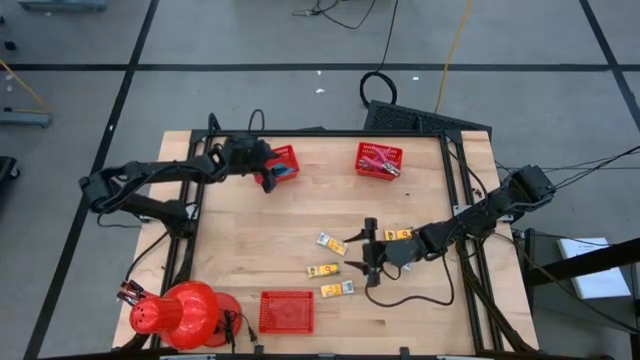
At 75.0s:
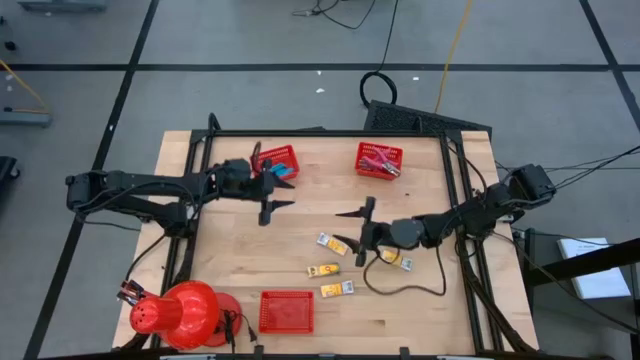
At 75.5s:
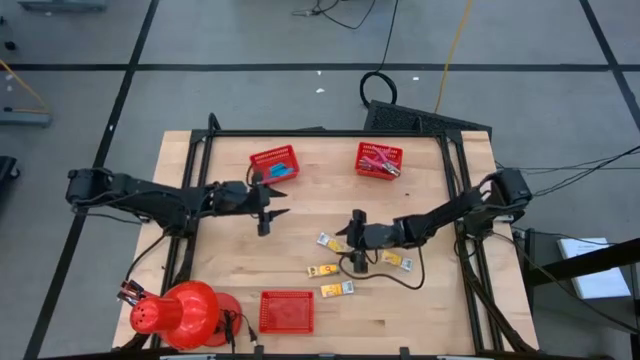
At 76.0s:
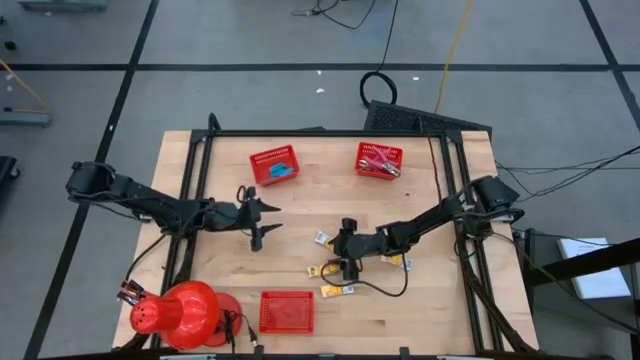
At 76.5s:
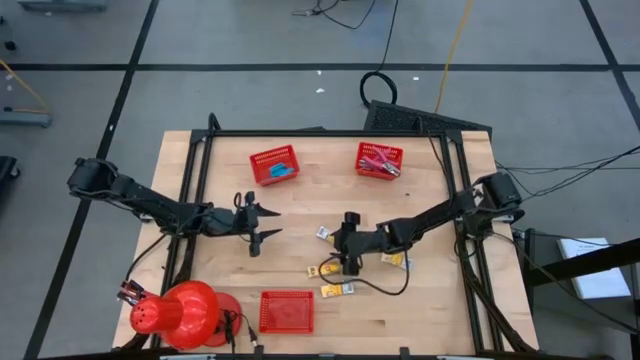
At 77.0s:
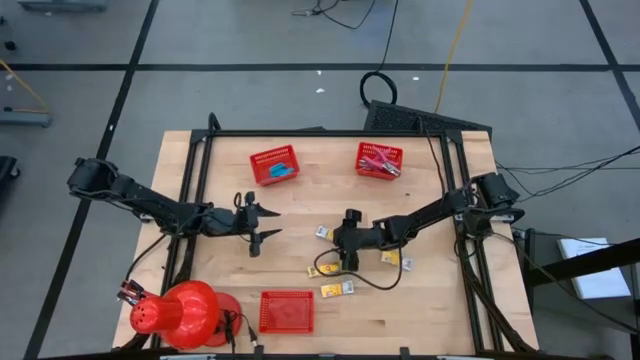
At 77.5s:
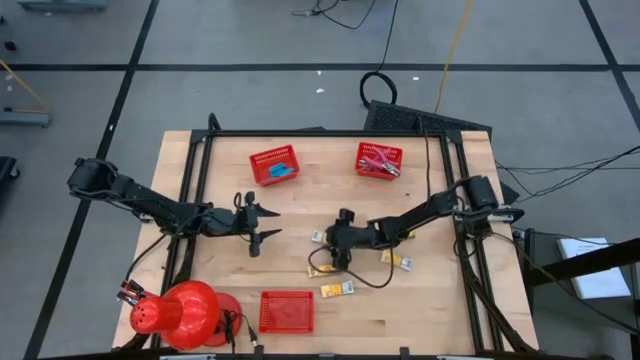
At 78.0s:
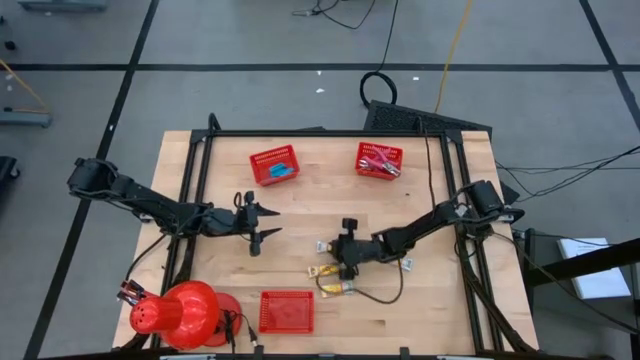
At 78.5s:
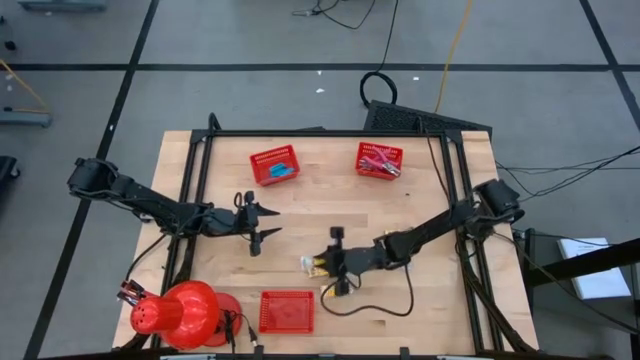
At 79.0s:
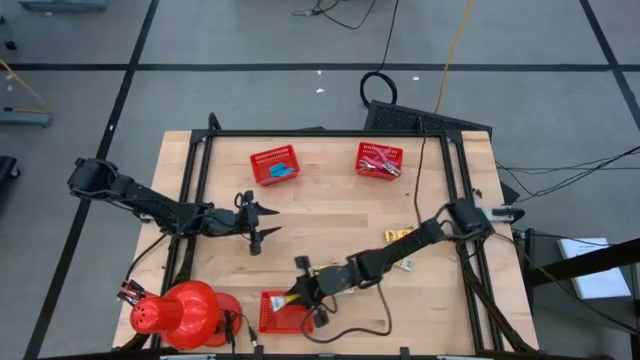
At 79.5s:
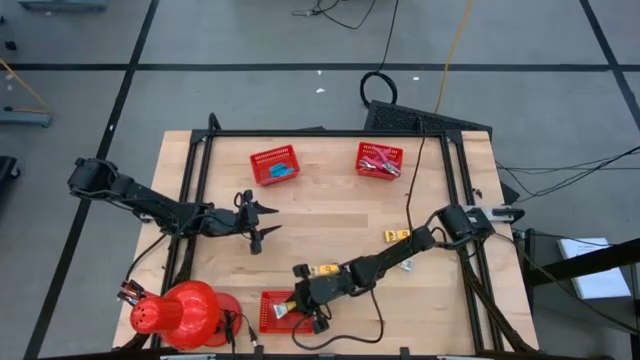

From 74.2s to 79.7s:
Task: Pick & Place School Supplies
Put the yellow crayon pack into the bottom left red bin

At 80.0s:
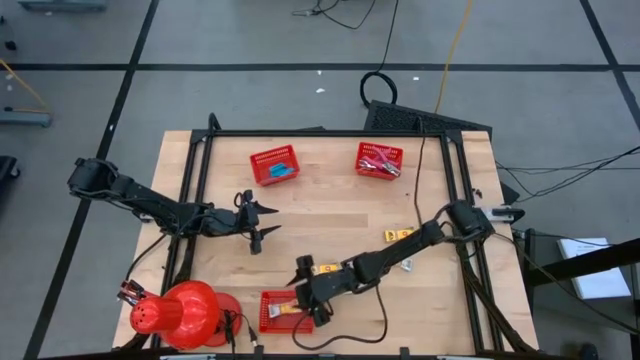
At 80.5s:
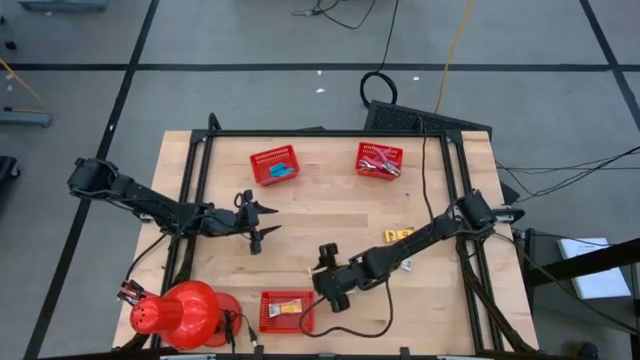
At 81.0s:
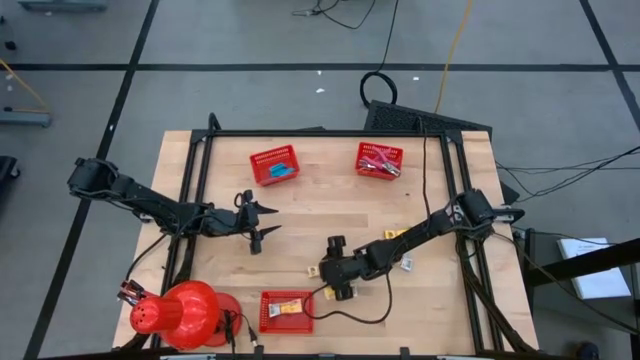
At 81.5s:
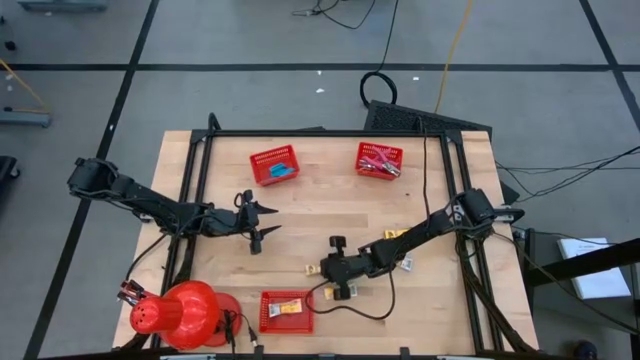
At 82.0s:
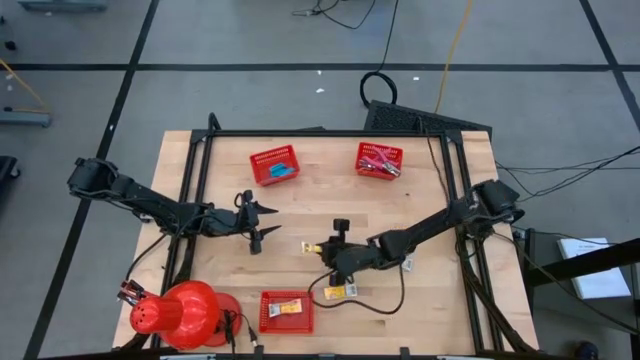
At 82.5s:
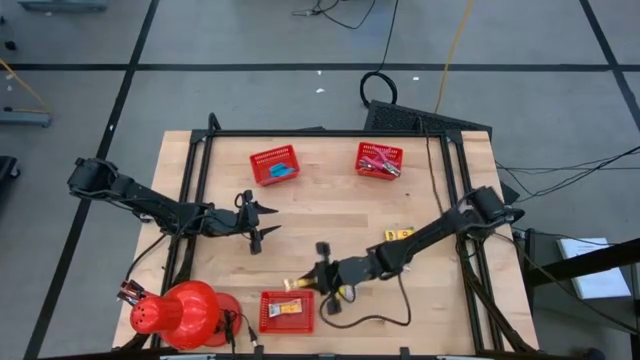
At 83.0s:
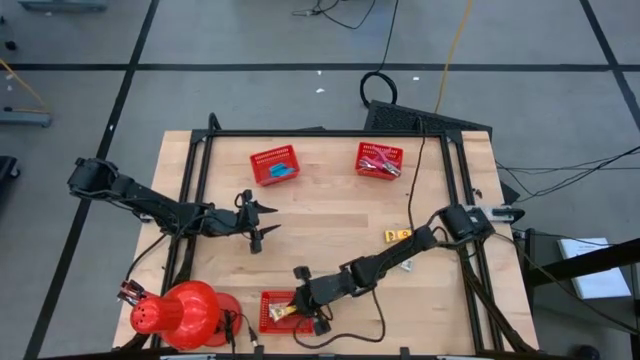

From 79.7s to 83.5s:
Put the yellow crayon pack into the bottom left red bin

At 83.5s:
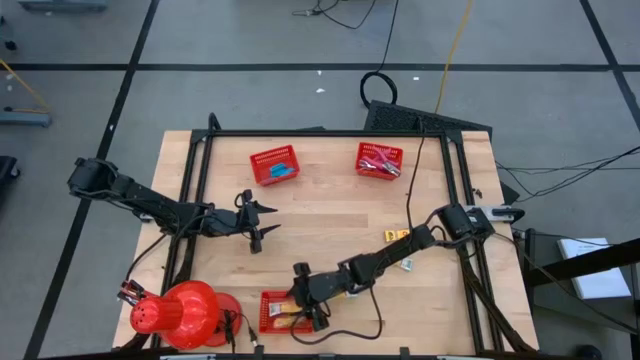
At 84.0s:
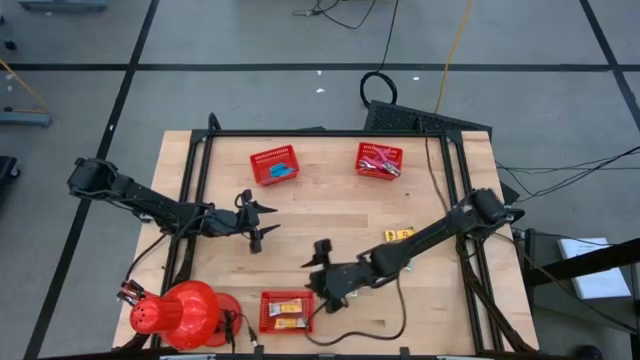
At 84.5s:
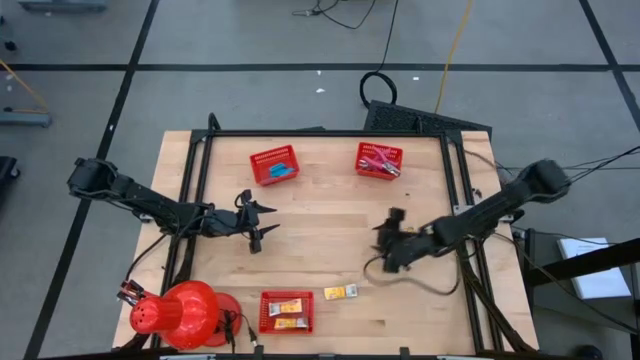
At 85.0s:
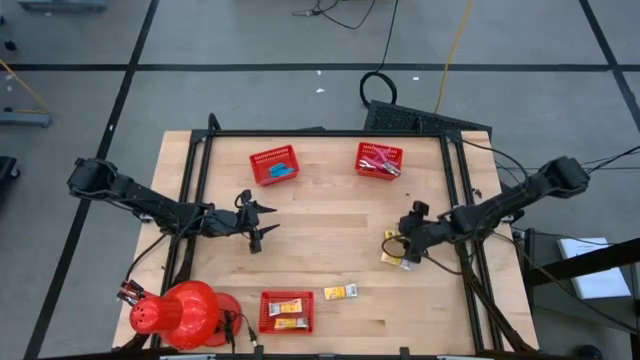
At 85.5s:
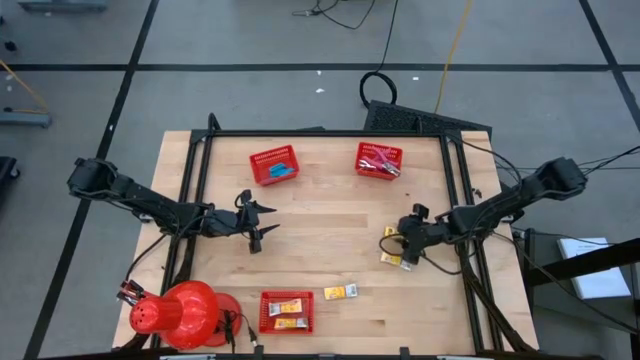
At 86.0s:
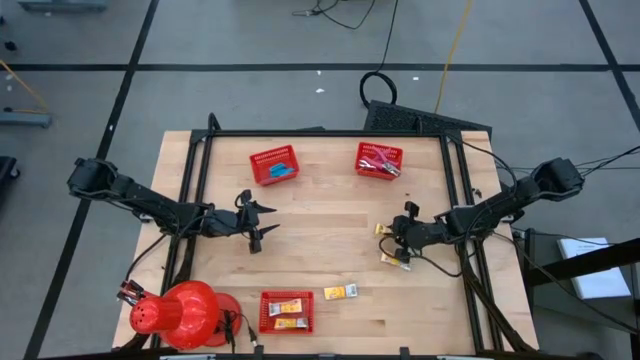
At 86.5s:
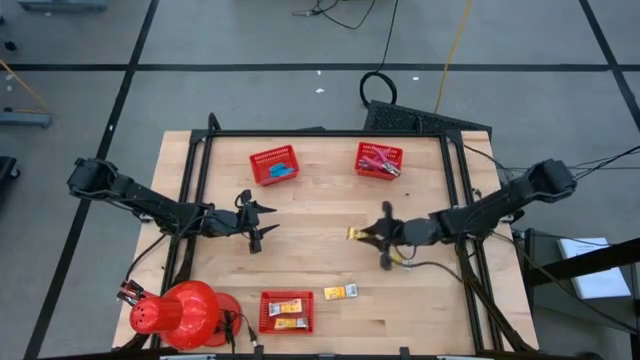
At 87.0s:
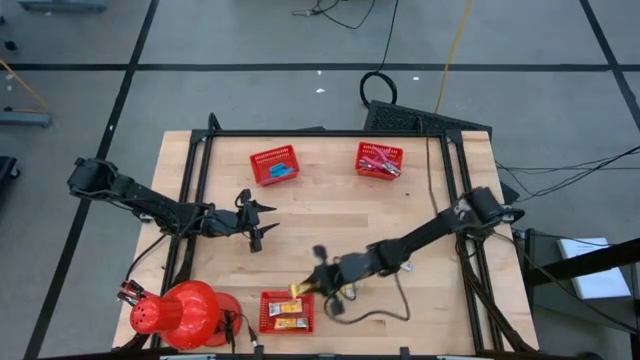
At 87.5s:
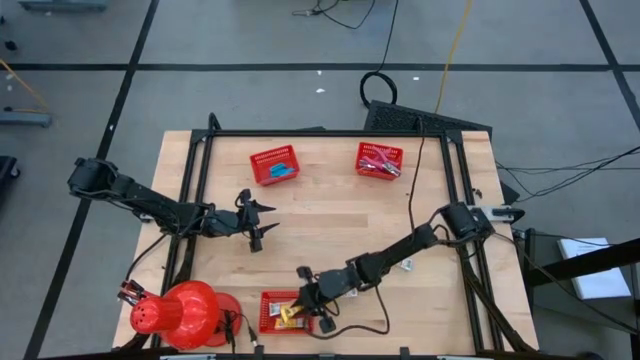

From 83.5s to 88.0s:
Put the yellow crayon pack into the bottom left red bin

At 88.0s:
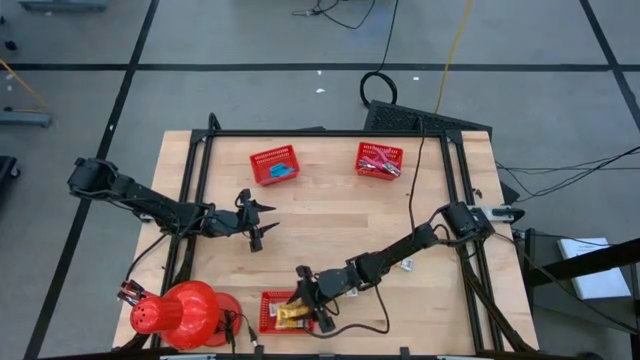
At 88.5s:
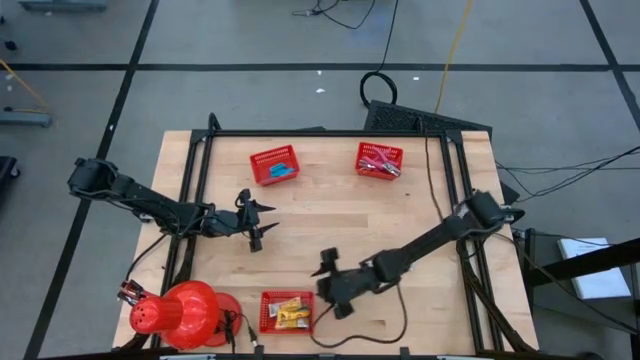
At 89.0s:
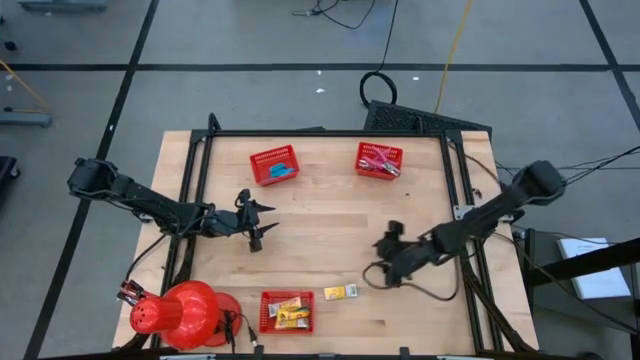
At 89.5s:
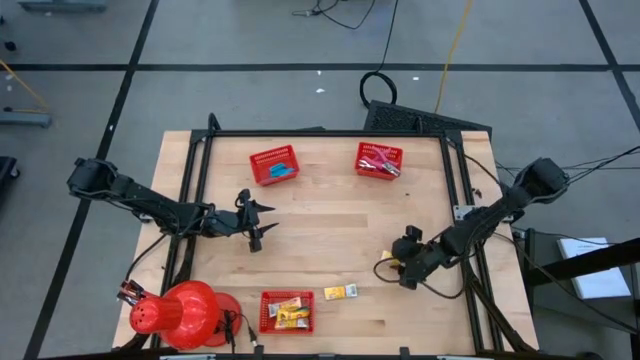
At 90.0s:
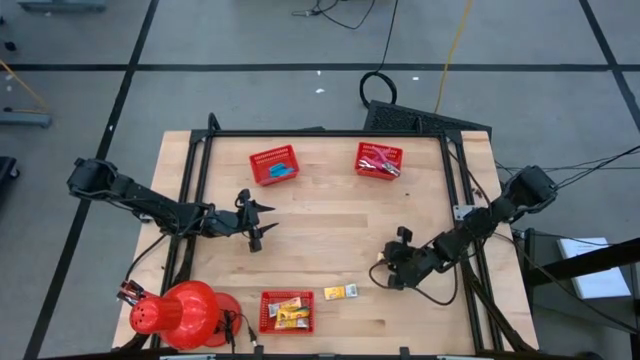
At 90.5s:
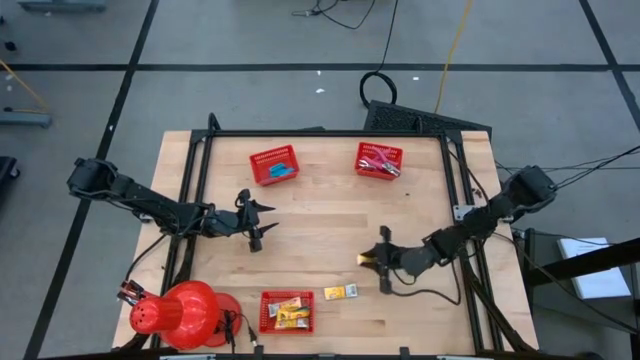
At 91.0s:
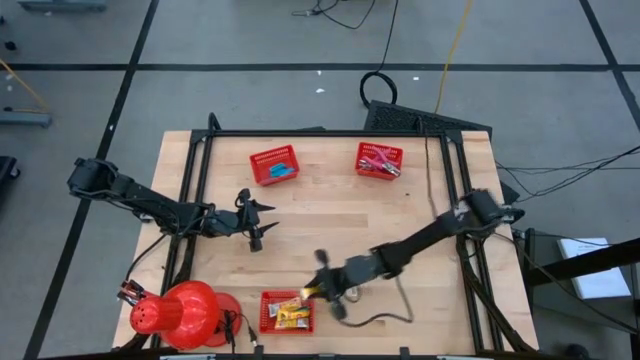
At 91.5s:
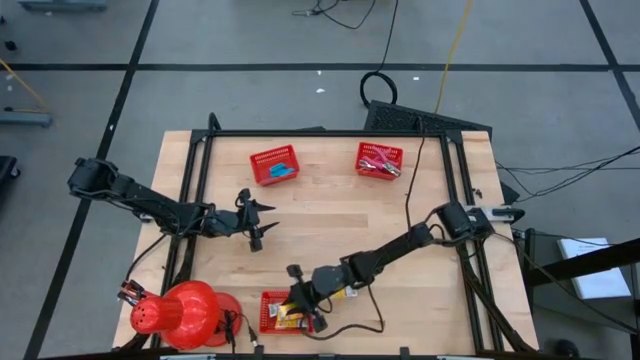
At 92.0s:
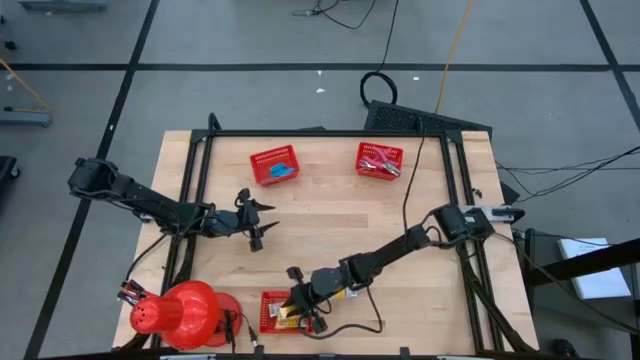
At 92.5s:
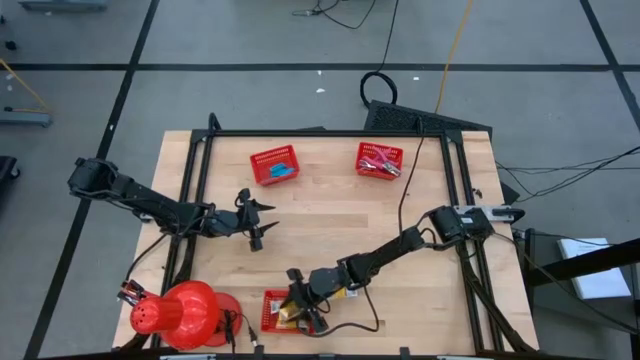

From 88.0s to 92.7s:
Put the yellow crayon pack into the bottom left red bin

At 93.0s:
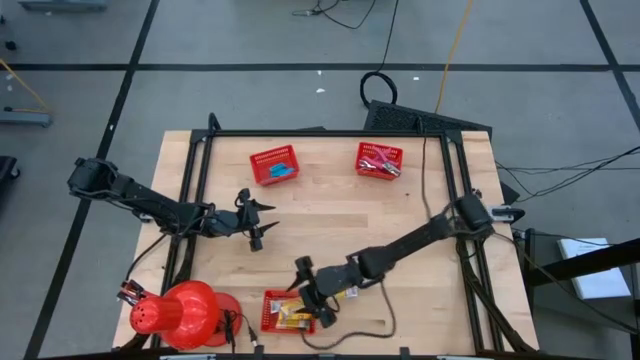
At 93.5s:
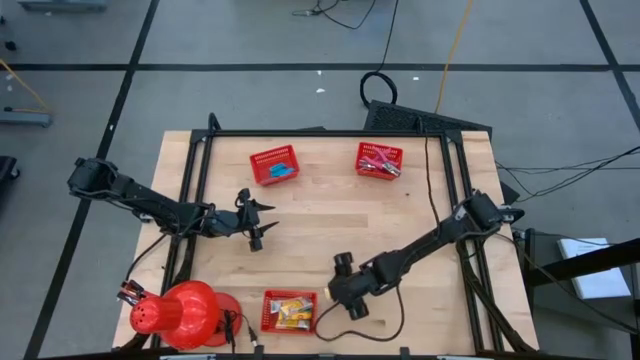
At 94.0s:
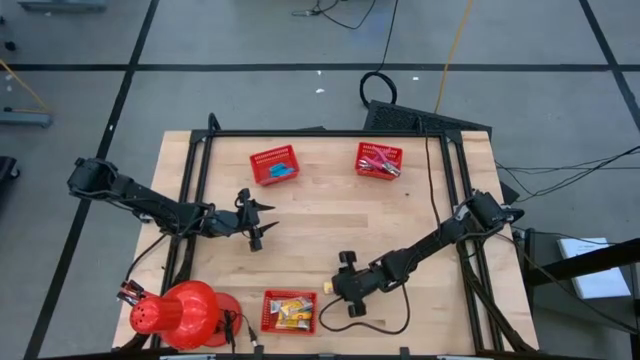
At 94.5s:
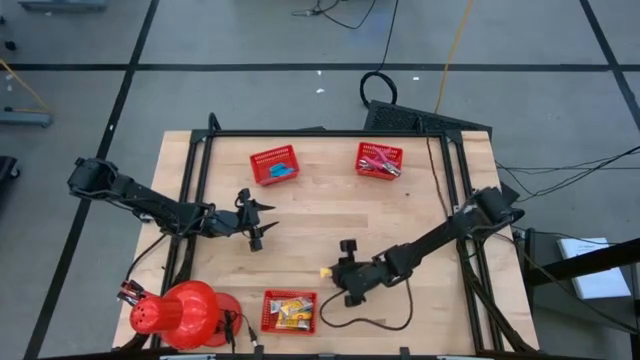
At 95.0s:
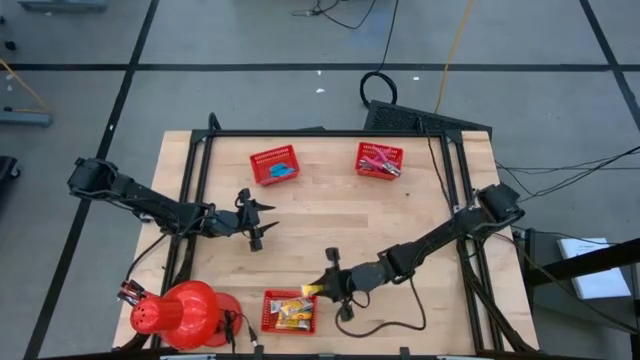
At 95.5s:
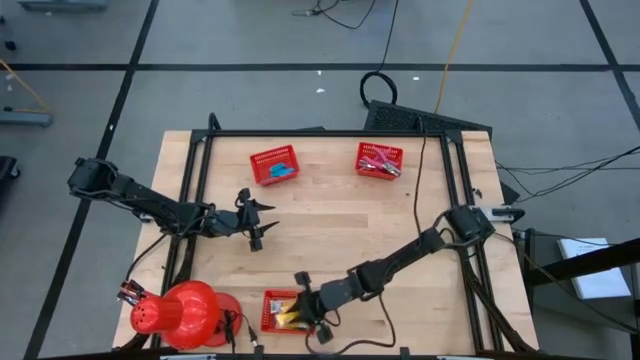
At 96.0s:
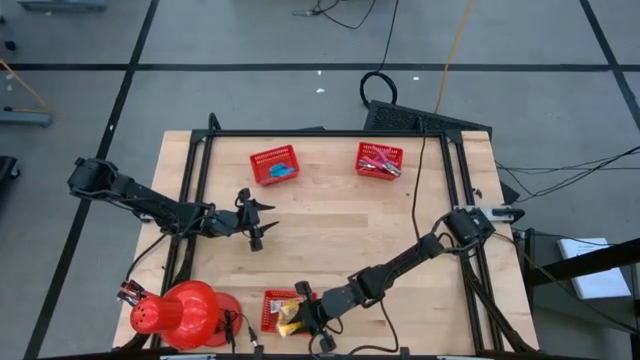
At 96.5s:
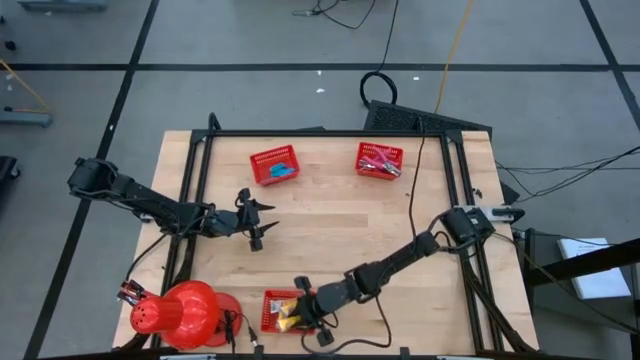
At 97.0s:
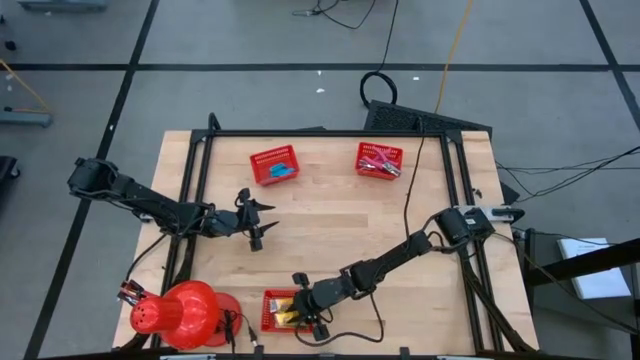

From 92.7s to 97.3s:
Put the yellow crayon pack into the bottom left red bin
